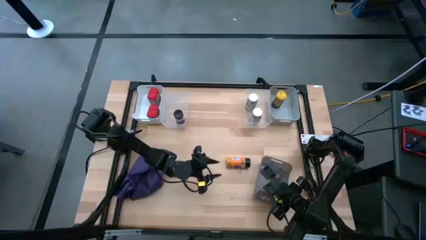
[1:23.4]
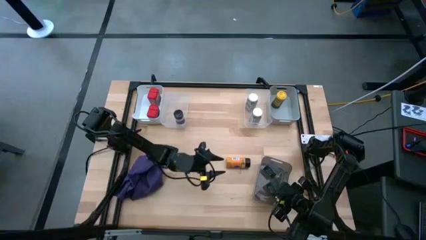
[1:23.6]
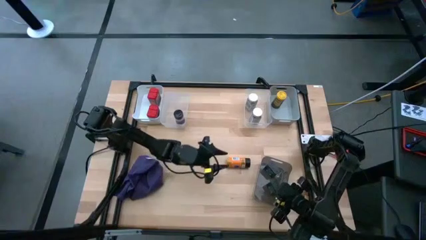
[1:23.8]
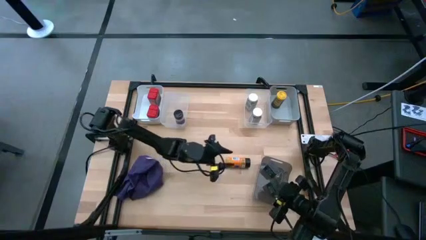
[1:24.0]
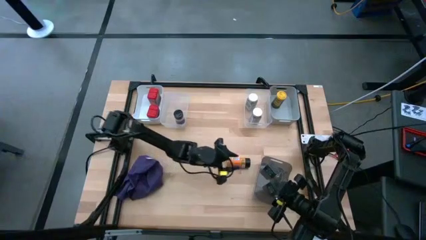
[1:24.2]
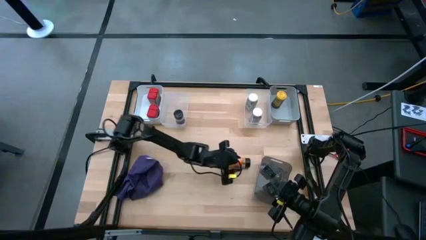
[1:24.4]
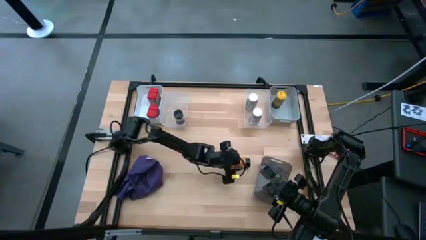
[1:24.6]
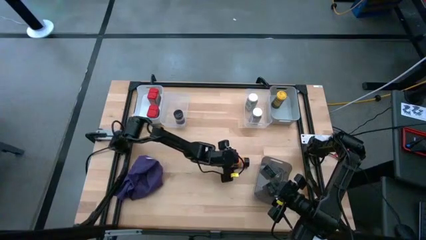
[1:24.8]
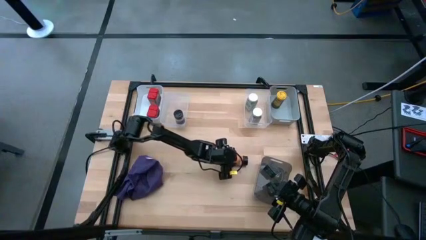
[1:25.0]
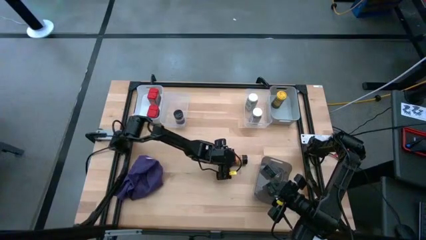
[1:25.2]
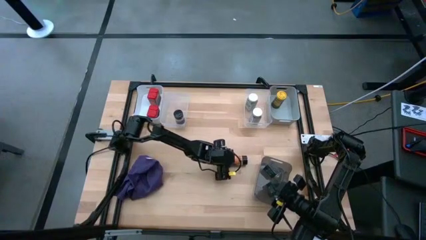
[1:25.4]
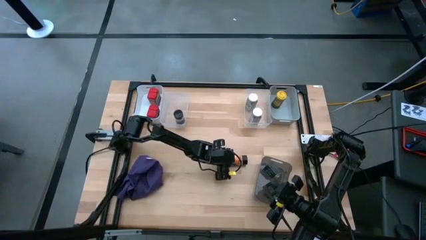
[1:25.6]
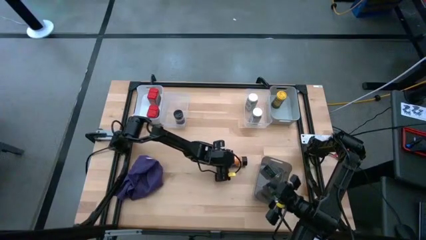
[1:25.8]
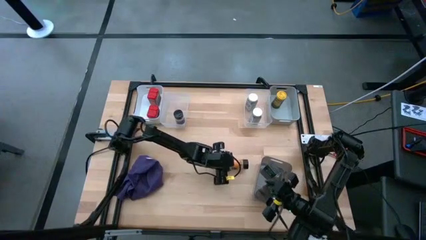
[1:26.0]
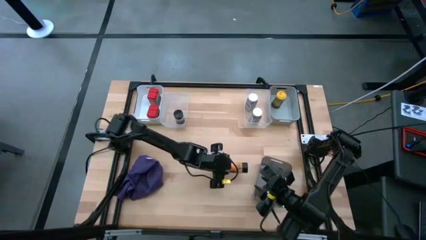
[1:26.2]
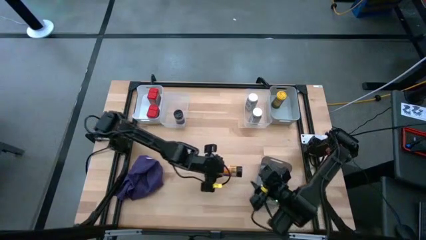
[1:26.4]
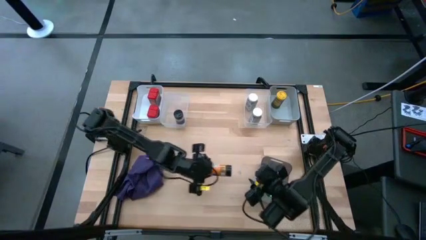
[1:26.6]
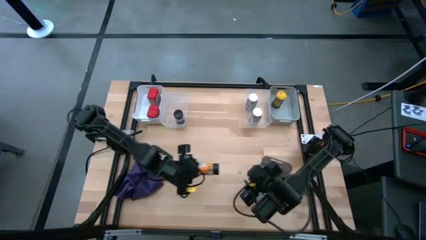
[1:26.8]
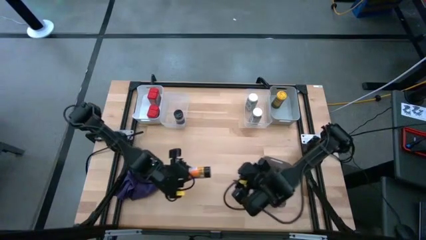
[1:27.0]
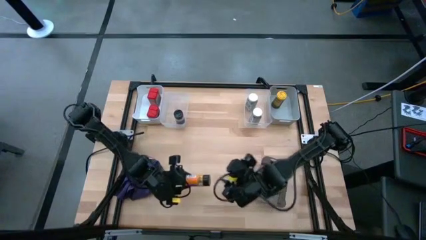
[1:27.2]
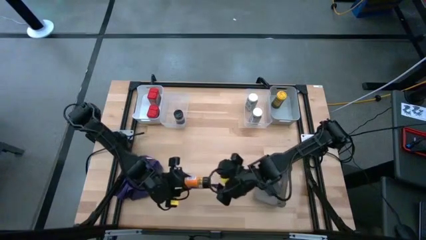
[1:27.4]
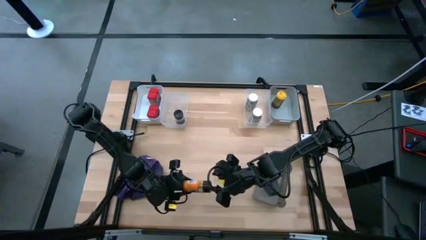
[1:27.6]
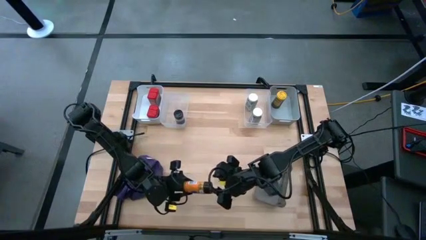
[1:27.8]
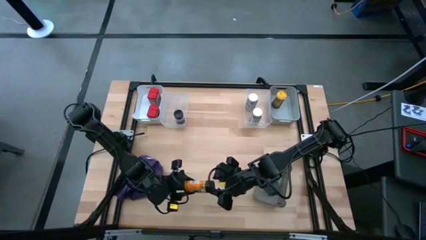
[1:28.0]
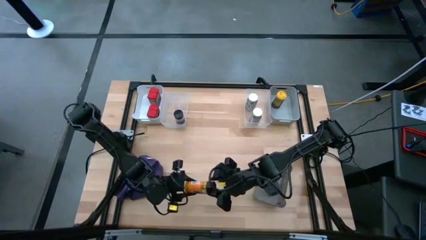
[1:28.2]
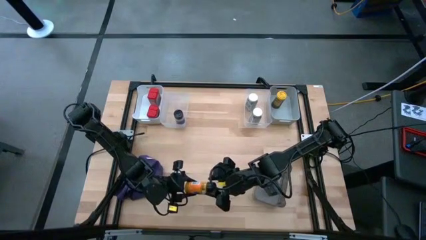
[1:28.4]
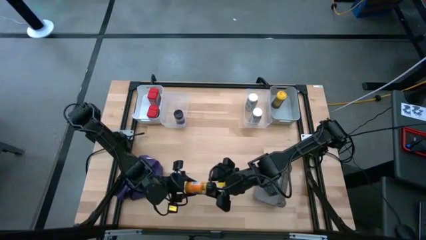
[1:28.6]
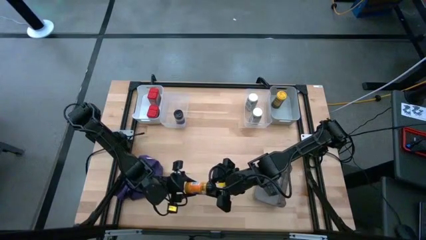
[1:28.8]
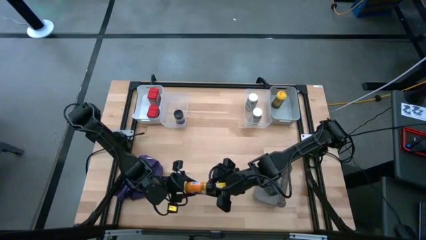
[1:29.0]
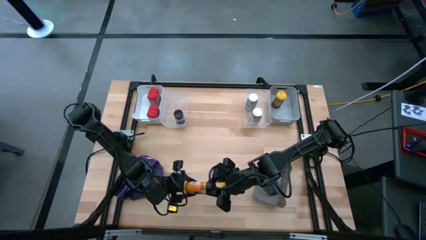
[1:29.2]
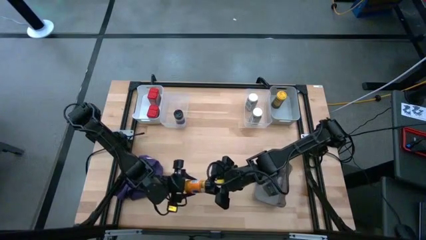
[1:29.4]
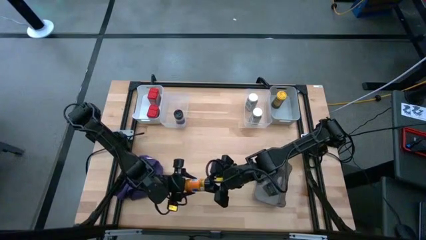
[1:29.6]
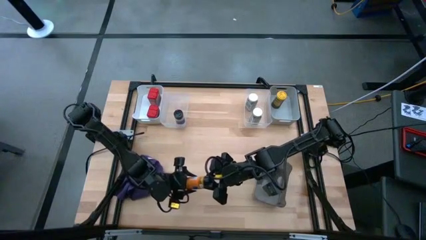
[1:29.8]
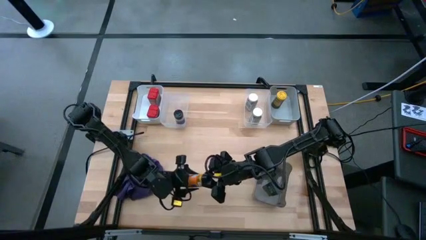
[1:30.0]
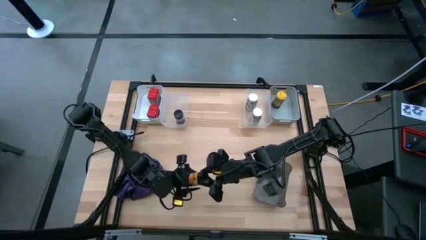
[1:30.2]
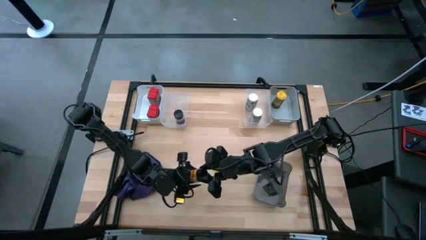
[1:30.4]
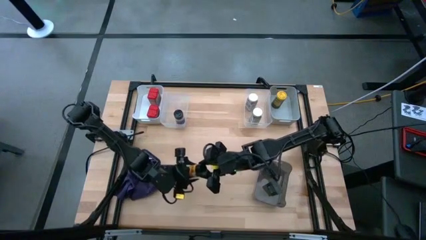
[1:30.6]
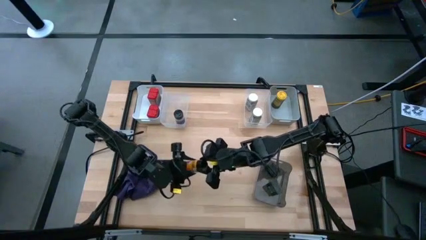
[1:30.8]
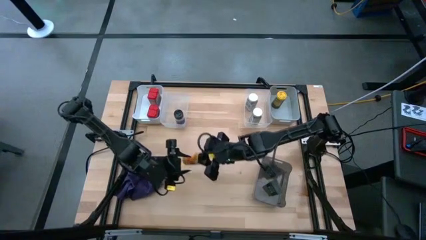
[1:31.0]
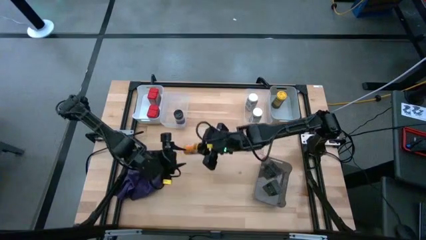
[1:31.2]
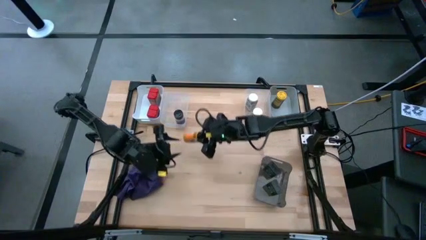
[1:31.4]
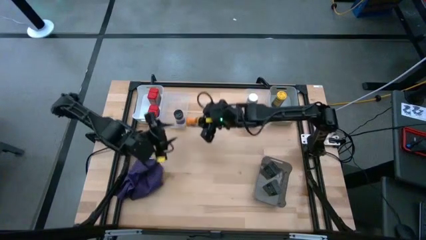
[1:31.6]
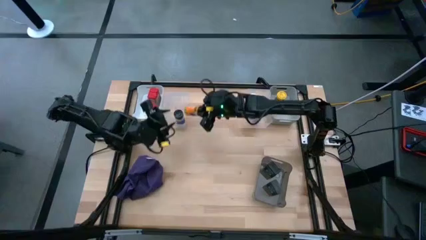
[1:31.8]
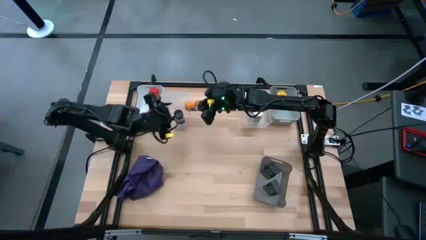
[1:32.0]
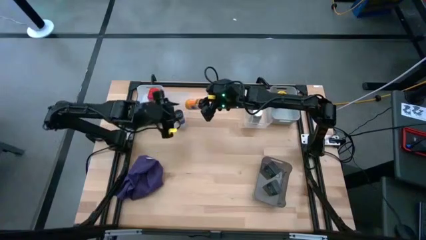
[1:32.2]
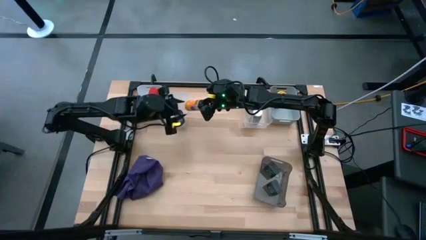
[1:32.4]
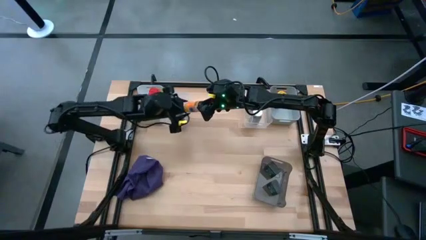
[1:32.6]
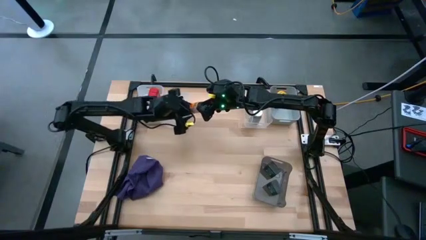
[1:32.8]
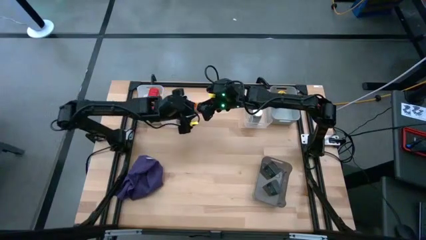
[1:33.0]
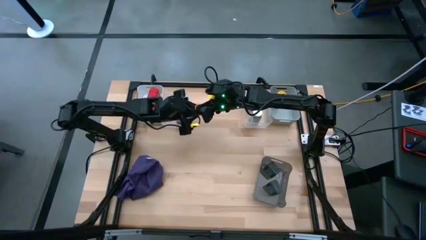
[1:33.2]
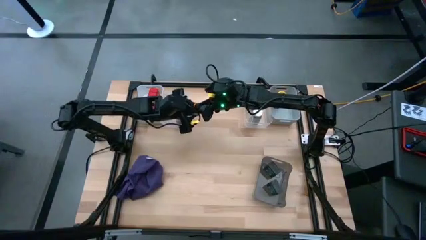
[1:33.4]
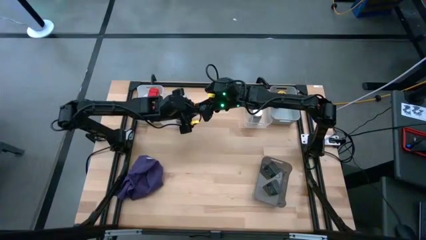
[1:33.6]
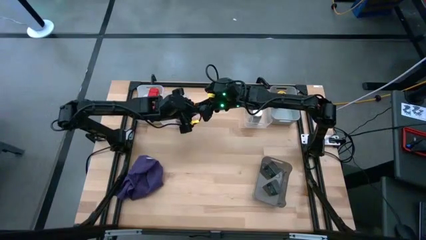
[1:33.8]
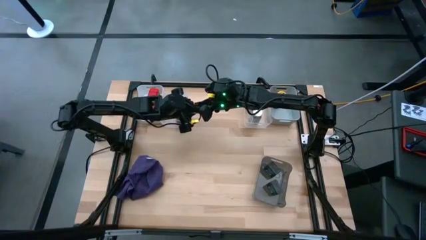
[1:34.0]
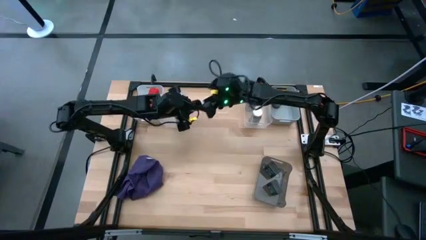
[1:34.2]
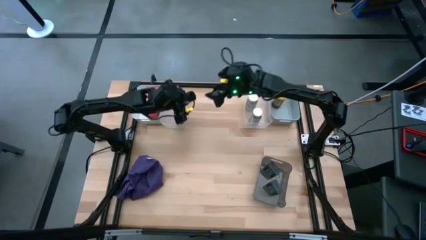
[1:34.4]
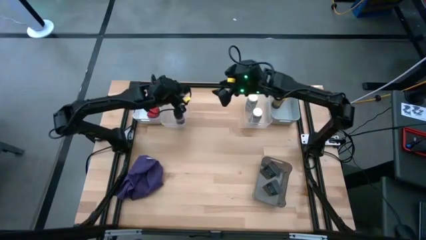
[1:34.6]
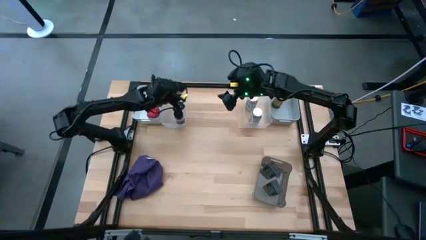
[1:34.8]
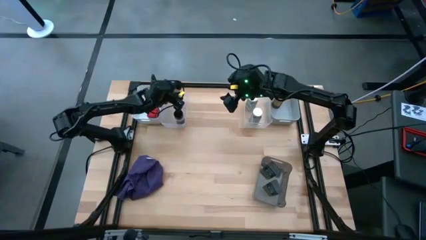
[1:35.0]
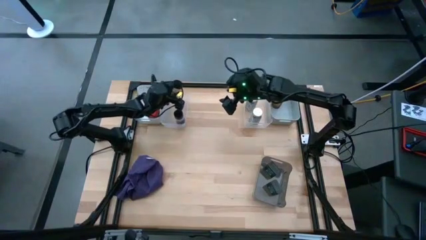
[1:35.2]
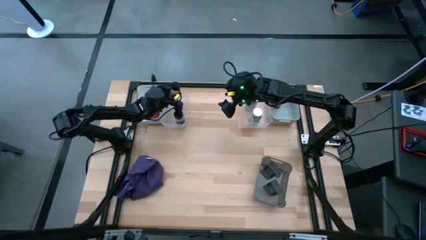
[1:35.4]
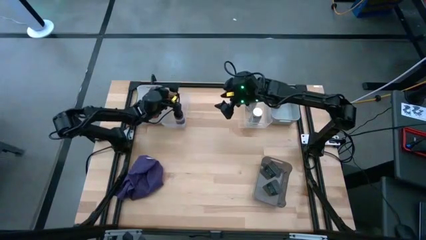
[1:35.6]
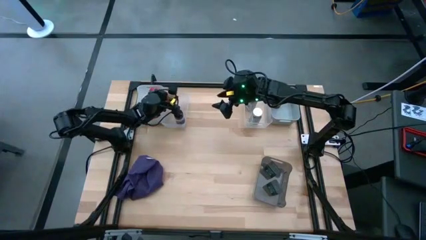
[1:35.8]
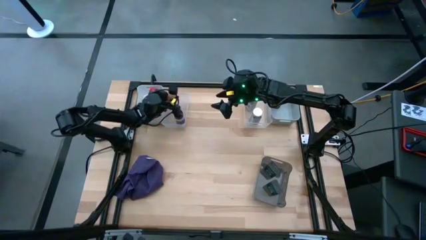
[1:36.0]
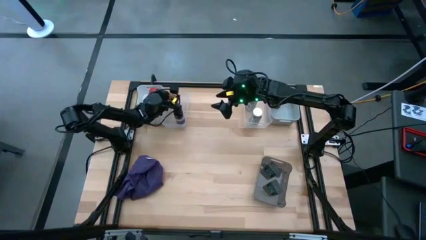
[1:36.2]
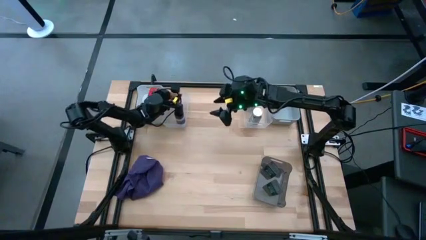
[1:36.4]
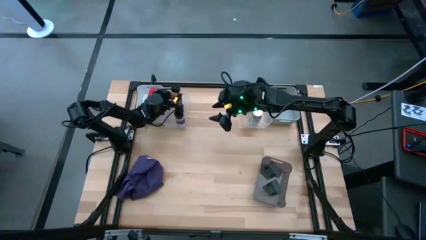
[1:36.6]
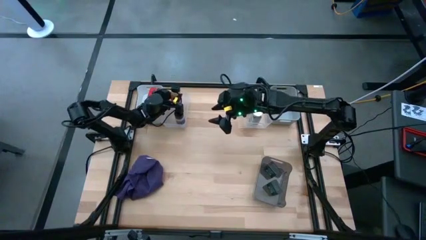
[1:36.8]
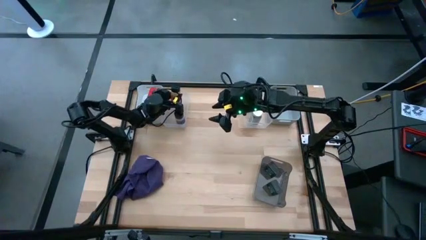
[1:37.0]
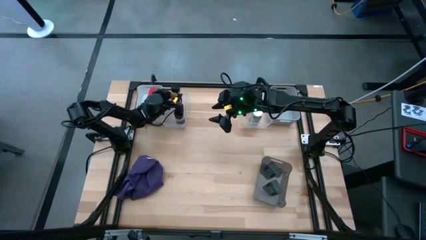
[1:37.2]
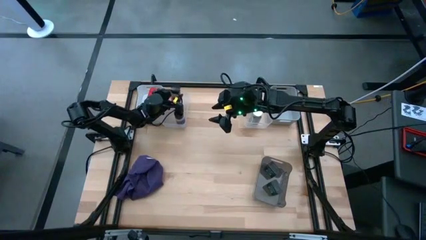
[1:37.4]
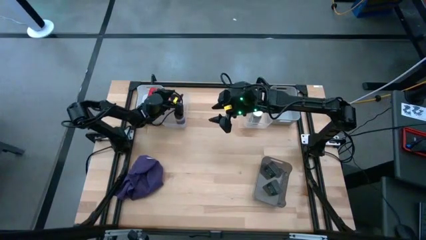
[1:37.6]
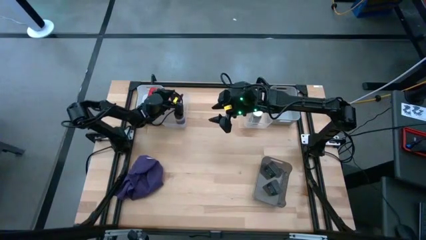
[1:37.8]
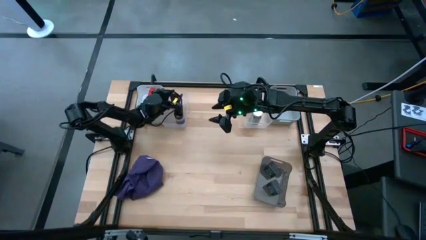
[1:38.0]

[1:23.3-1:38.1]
Task: Sort spices by type
Put the black seasoning bottle into the left transparent bin

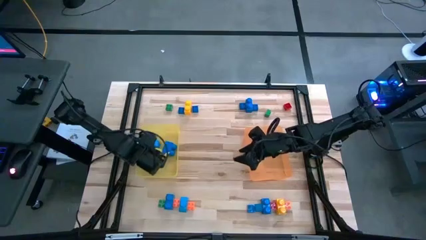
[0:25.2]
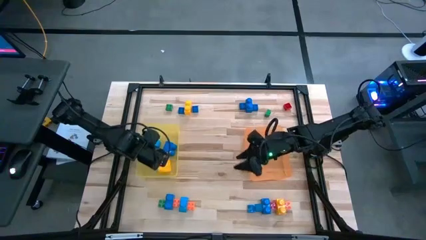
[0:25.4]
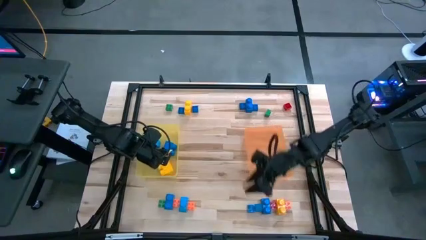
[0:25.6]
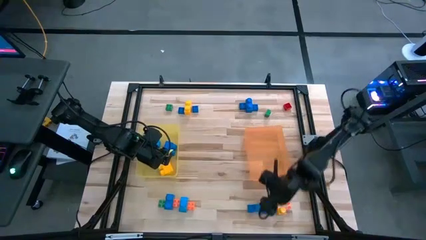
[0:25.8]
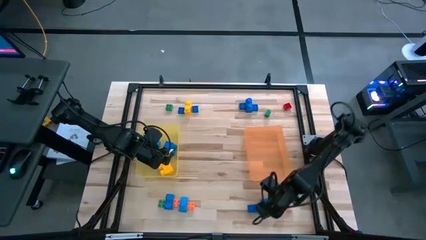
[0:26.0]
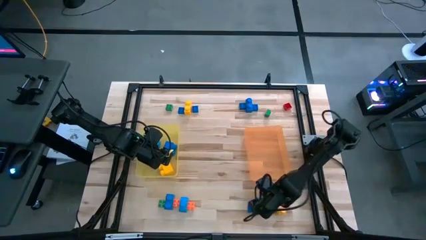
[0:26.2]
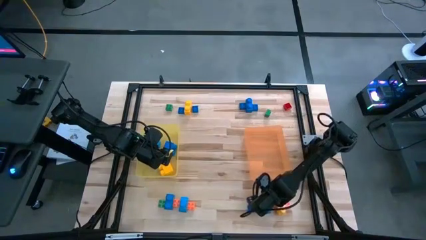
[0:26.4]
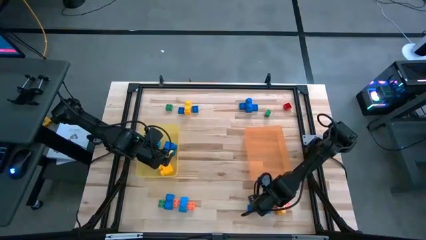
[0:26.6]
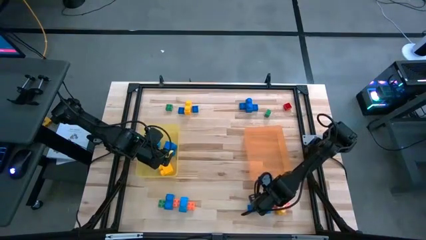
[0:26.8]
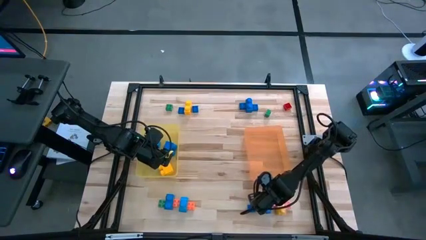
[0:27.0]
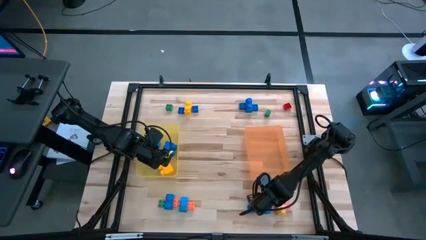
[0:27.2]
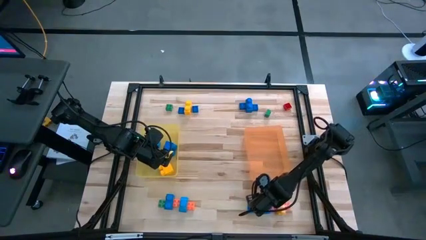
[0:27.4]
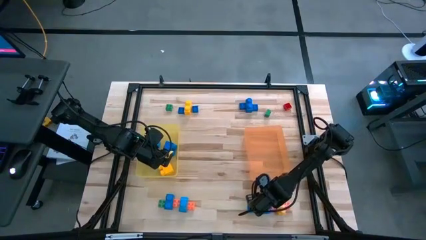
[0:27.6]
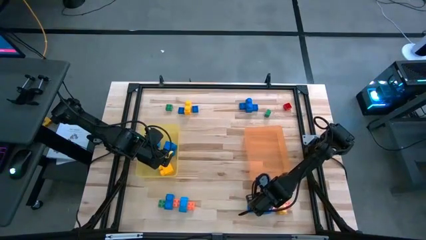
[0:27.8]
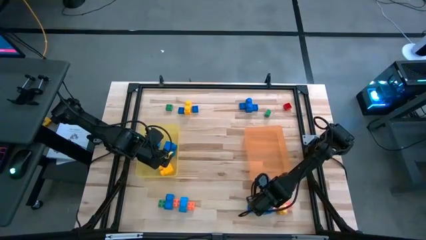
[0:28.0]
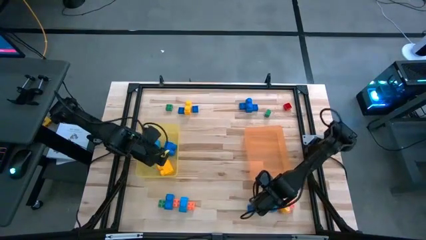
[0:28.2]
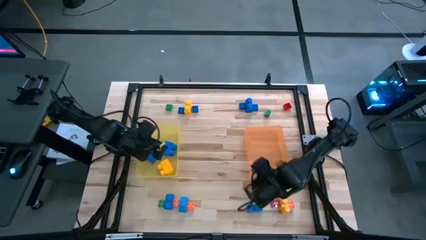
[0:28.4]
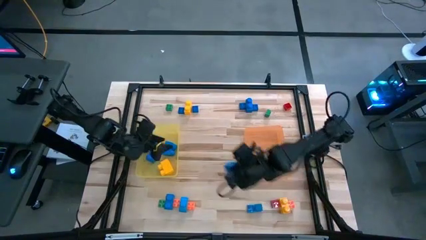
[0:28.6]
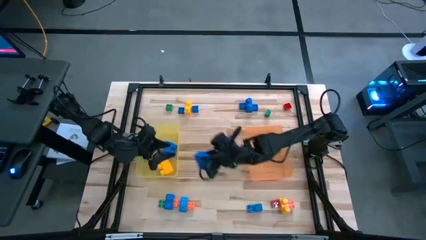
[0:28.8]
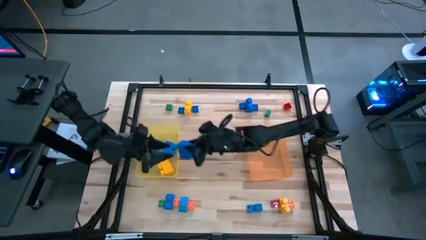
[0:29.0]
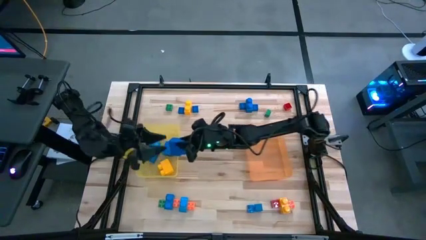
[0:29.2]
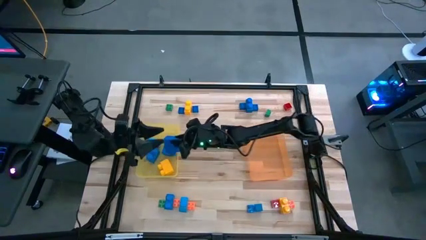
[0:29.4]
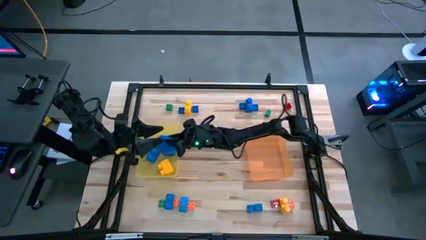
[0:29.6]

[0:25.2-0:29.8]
Task: Sort blocks by size
Put the large blue game piece into the yellow bin
